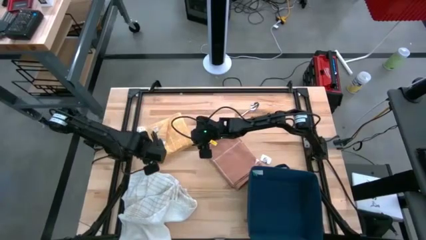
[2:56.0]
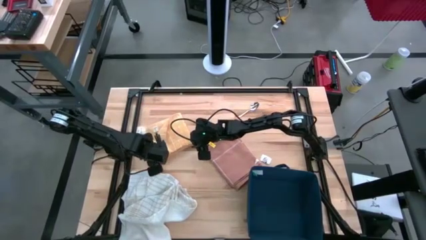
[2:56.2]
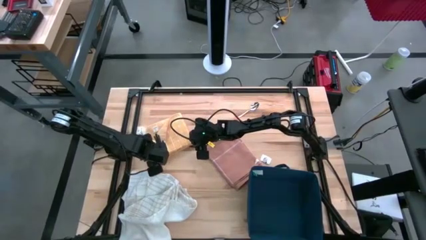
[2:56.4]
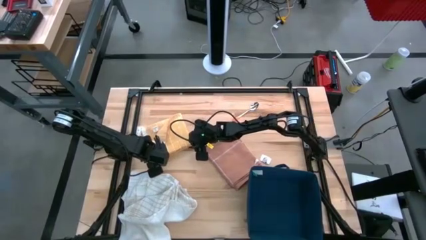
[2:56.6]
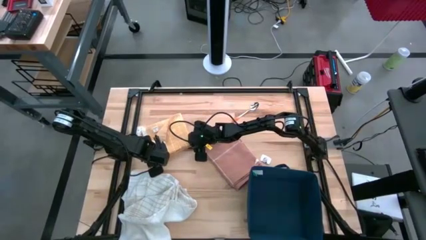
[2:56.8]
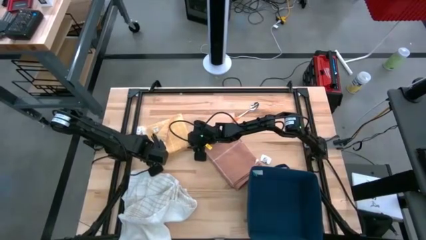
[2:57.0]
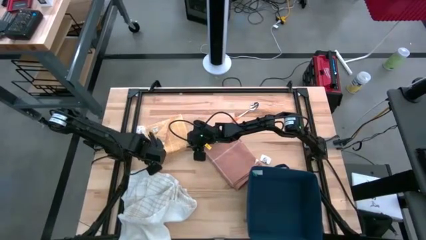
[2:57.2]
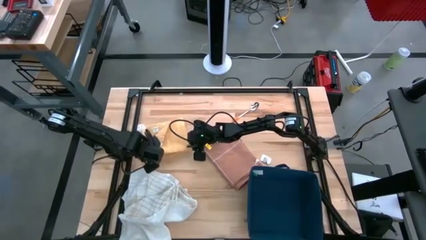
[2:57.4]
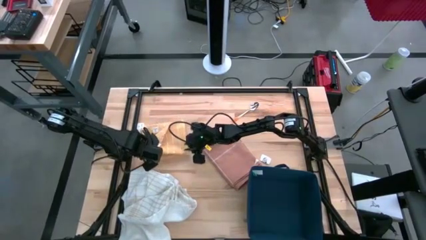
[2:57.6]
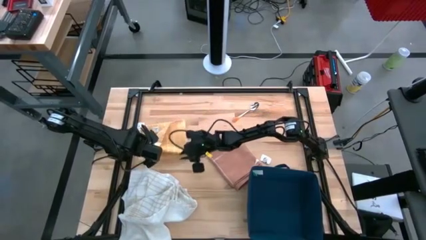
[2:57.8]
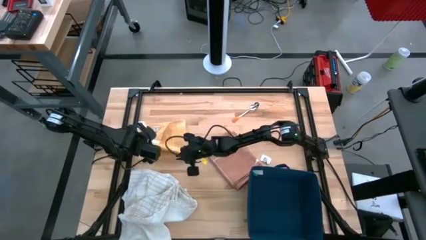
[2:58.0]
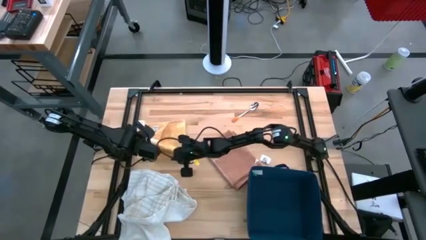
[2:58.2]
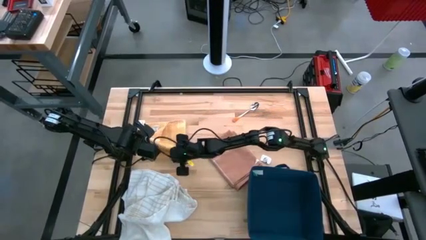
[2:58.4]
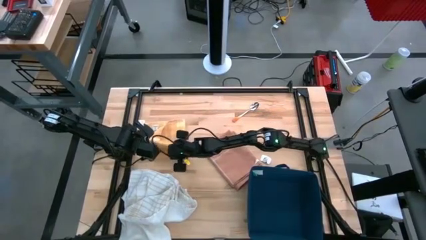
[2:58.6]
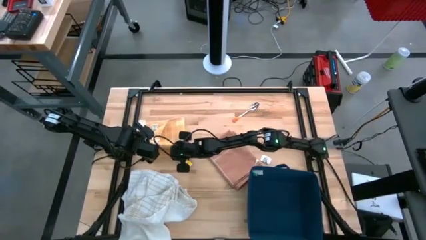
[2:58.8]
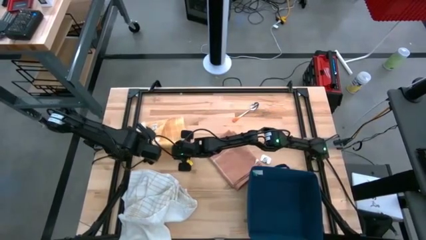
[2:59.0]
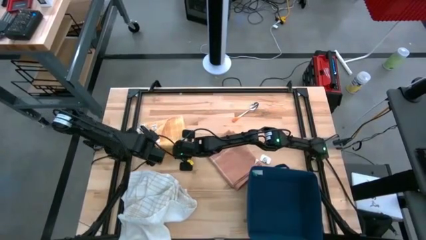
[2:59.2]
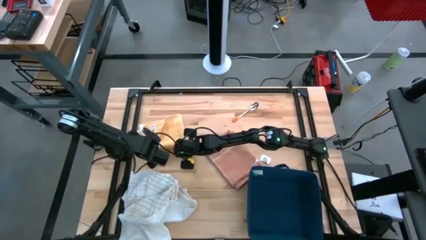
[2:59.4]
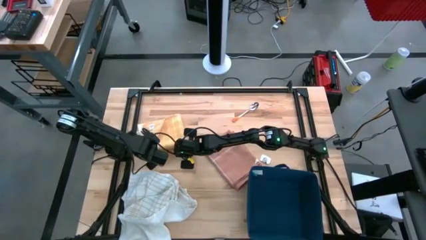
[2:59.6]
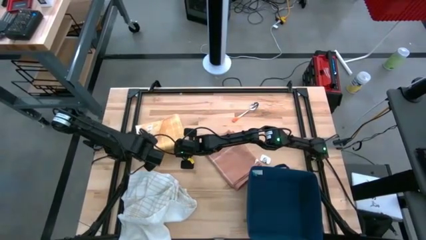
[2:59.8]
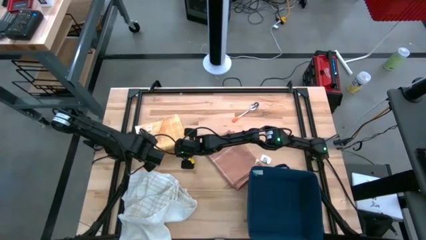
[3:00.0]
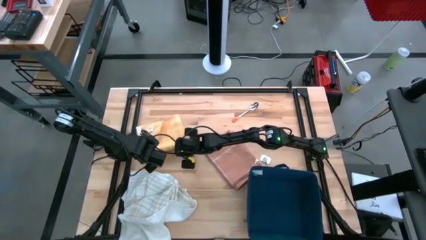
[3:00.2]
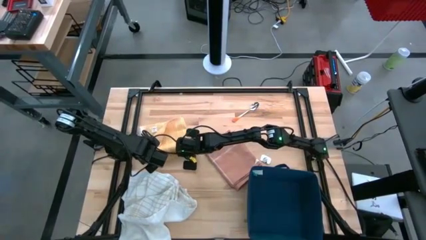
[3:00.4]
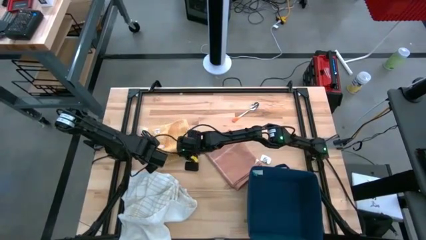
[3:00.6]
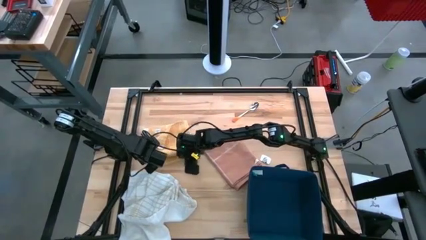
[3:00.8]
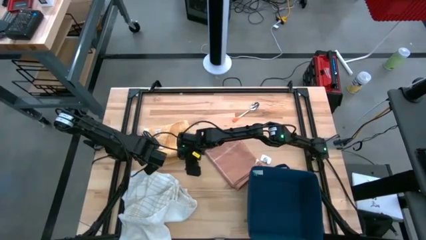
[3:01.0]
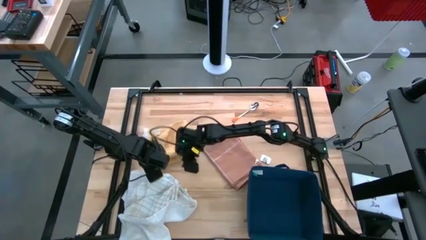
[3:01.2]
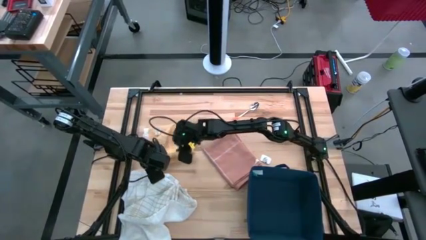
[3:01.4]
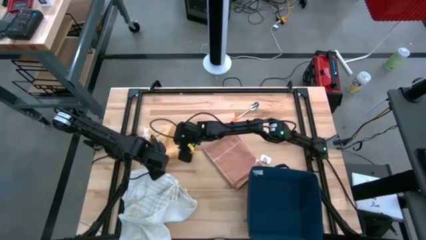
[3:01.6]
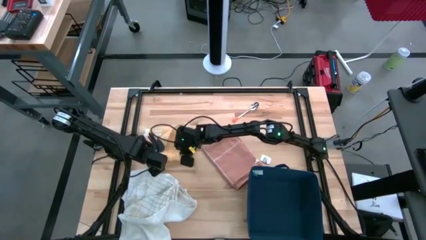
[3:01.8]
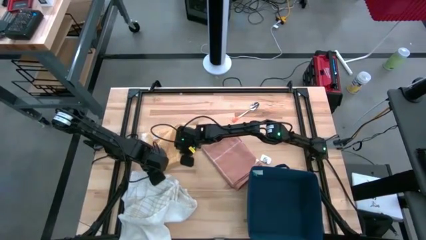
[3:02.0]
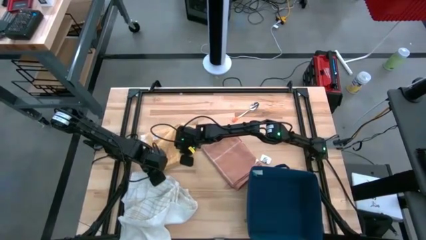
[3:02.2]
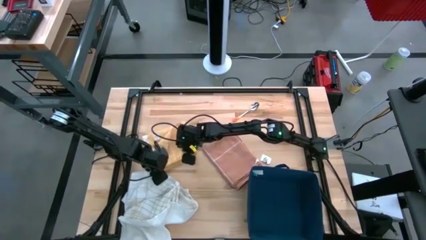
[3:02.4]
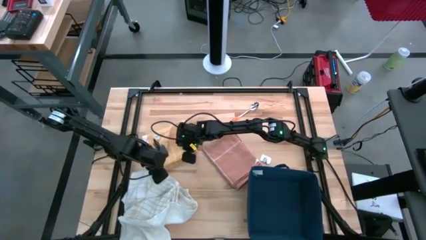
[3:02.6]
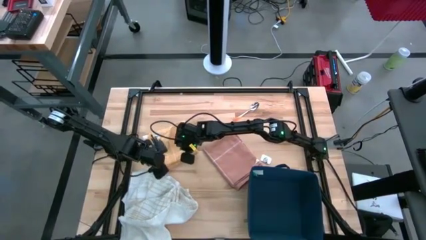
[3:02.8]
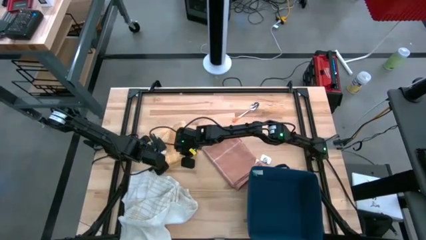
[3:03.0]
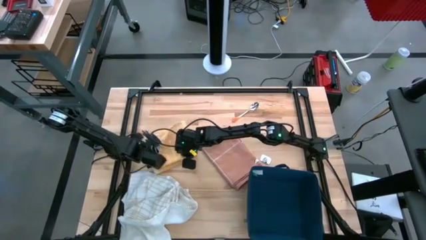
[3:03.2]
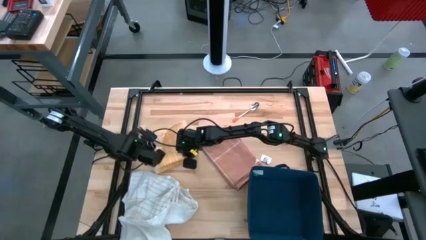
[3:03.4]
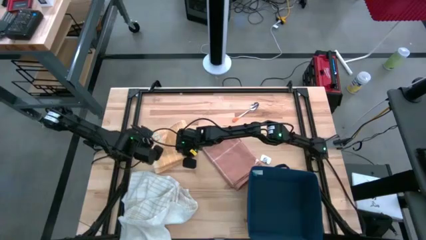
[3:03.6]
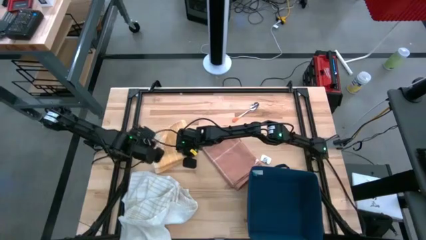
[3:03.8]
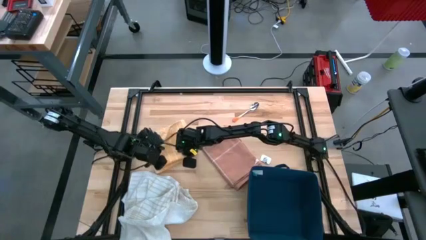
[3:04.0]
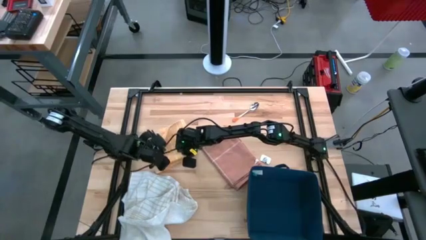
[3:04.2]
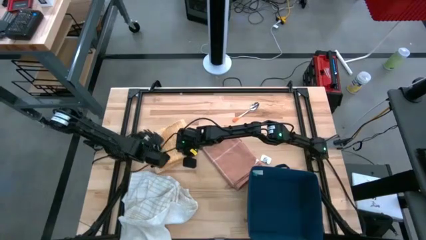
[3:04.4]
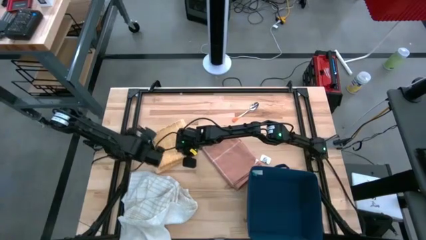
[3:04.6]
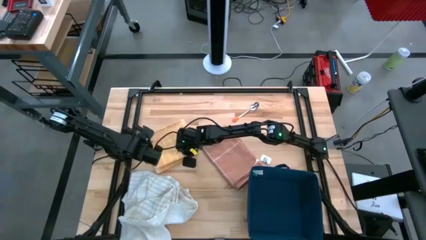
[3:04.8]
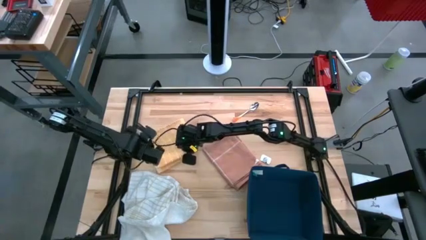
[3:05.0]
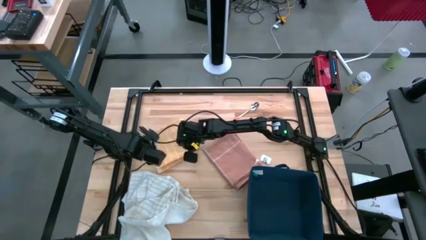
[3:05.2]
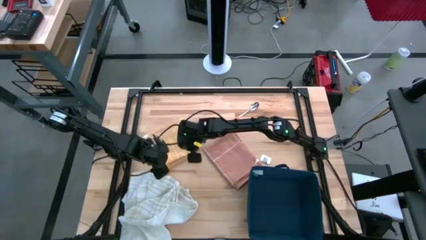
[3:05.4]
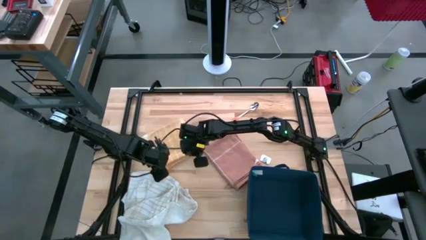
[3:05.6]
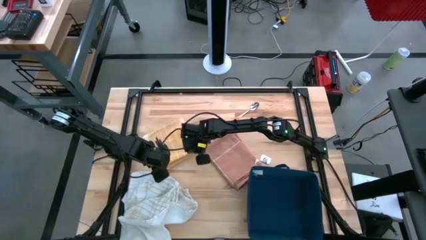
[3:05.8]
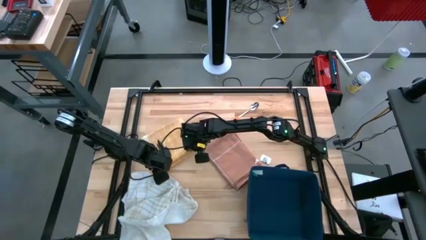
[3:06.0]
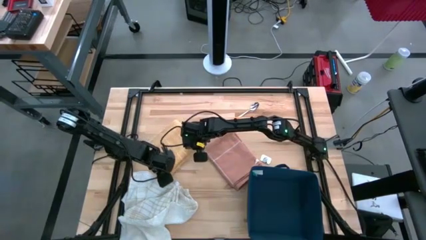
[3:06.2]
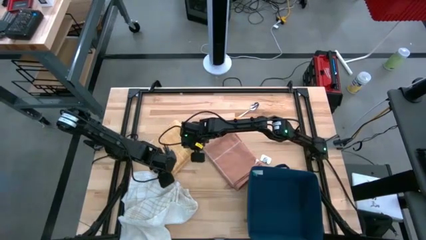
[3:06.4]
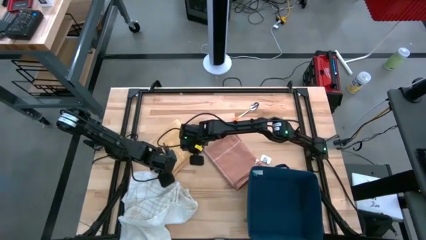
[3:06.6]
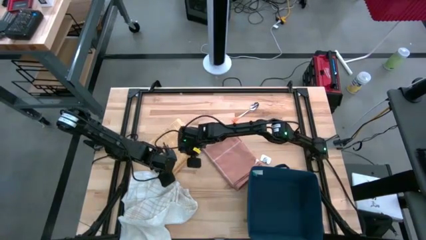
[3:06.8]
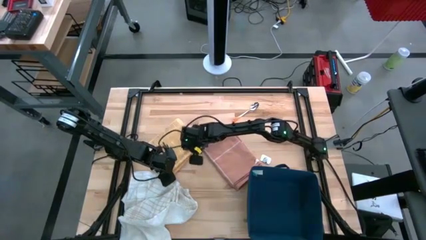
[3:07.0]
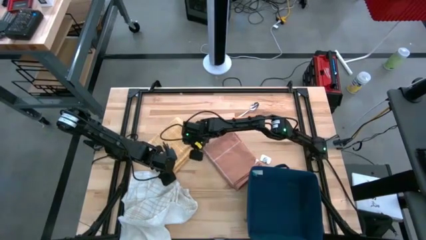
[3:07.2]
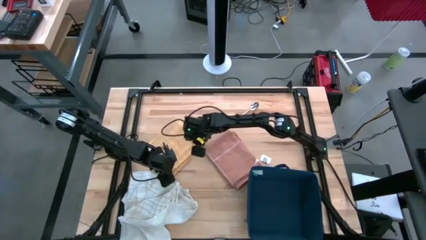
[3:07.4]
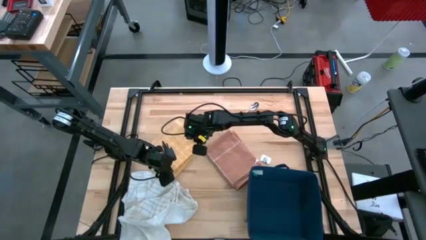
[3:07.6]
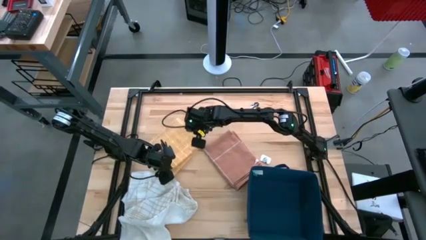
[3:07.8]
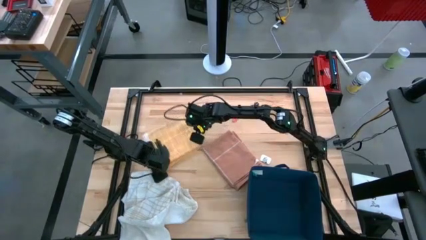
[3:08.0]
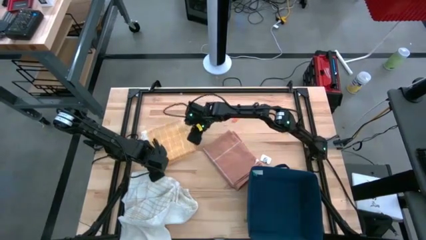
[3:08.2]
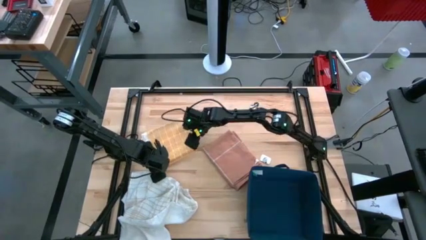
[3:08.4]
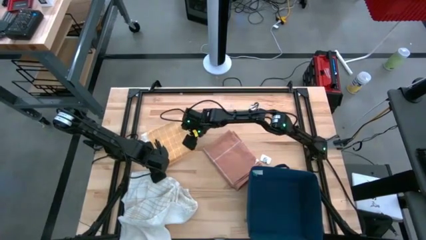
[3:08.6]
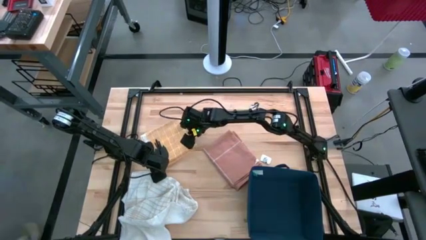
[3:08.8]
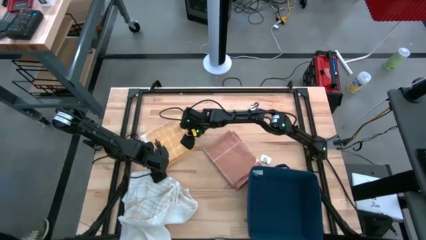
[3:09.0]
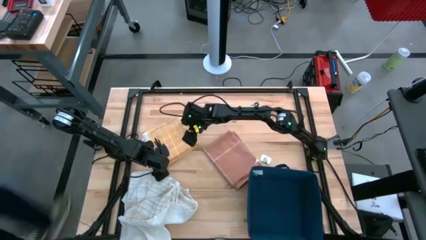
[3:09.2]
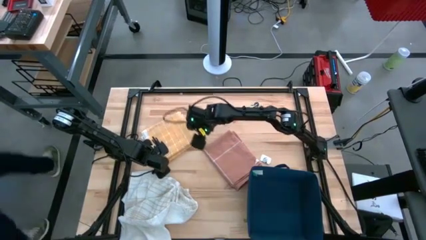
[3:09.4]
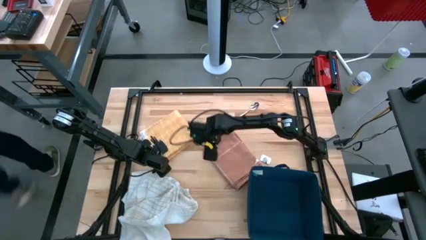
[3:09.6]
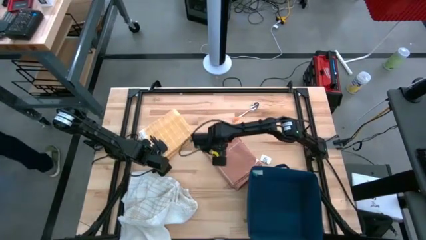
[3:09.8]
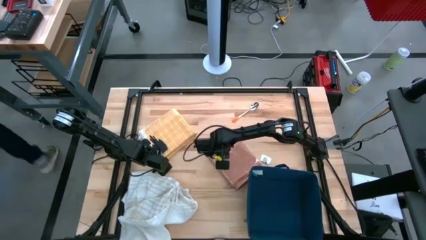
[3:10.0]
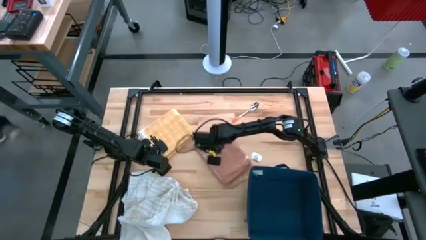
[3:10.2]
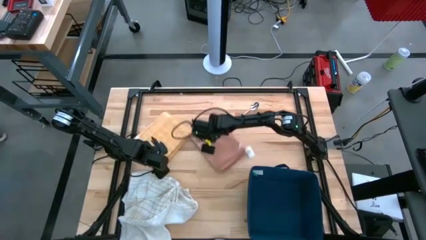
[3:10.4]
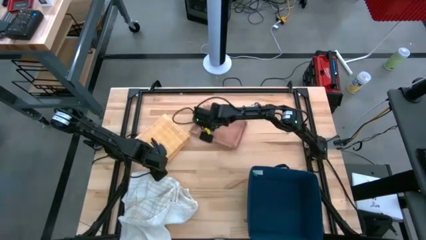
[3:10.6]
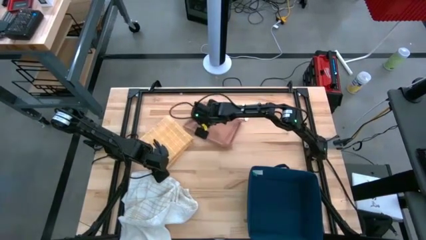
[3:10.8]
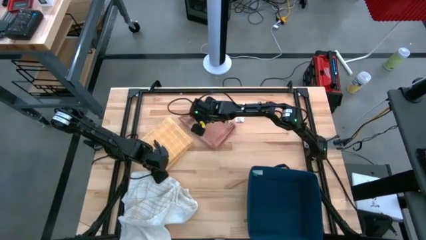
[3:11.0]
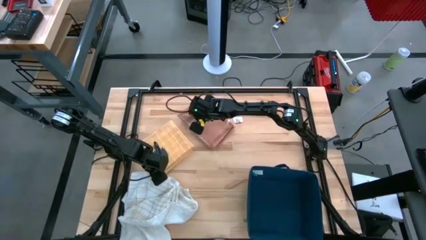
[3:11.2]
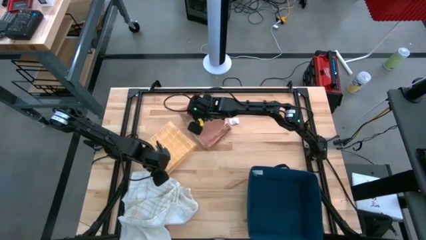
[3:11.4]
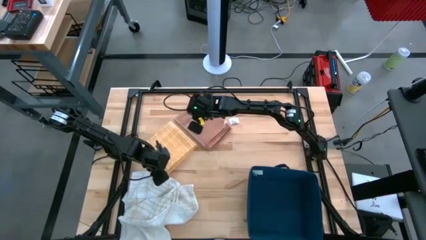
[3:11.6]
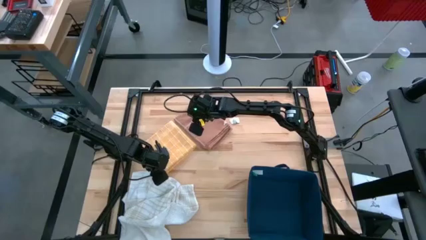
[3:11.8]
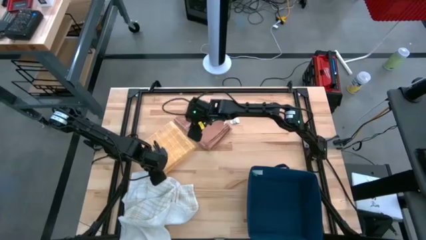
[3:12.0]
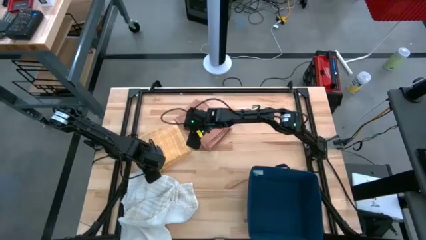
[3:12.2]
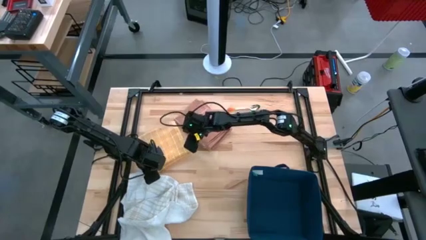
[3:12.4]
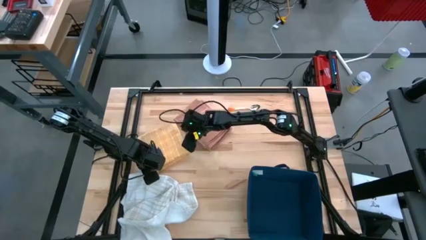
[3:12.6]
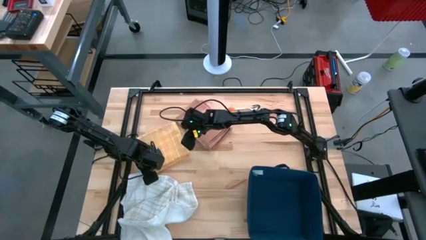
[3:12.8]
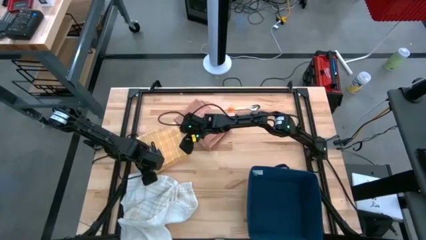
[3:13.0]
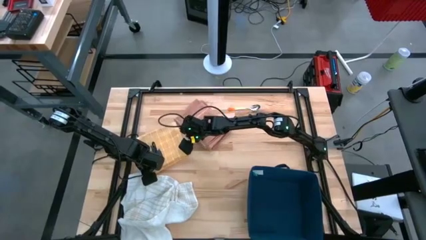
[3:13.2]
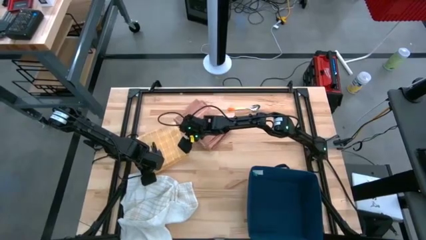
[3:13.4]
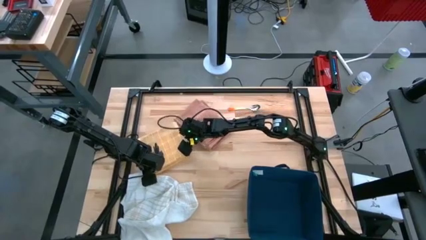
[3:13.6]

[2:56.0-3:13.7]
Task: Fold towel
Fold the yellow towel
